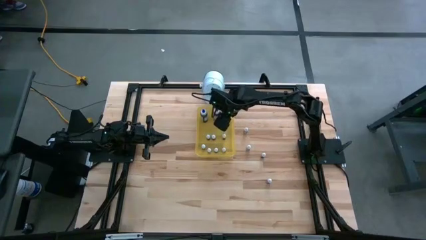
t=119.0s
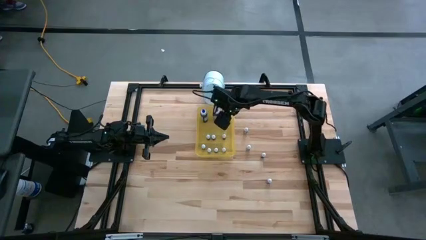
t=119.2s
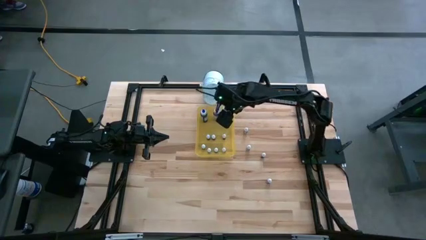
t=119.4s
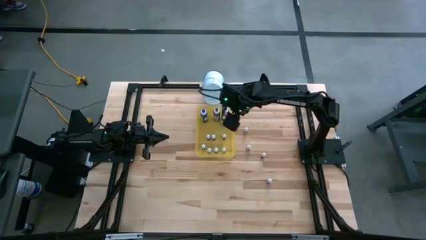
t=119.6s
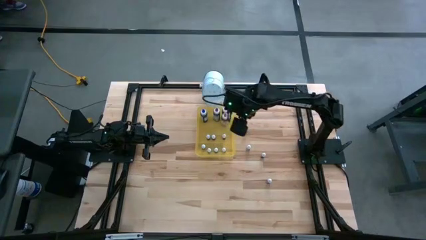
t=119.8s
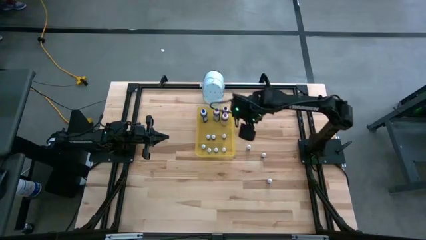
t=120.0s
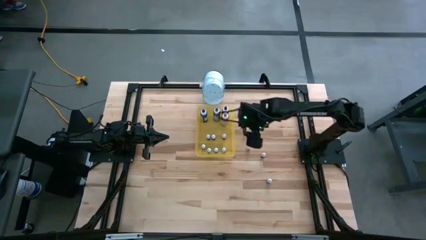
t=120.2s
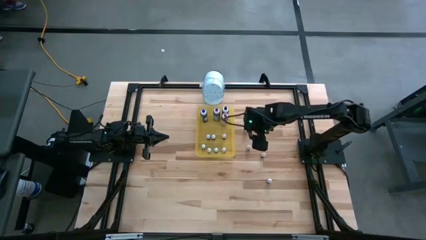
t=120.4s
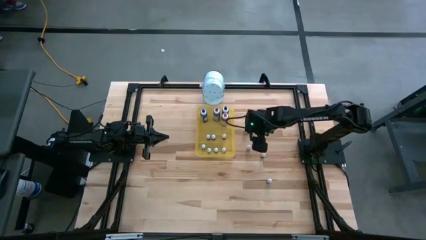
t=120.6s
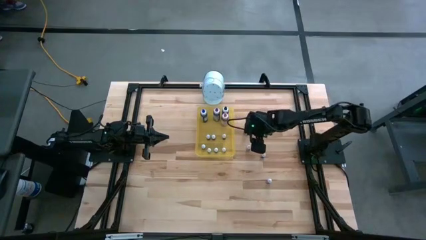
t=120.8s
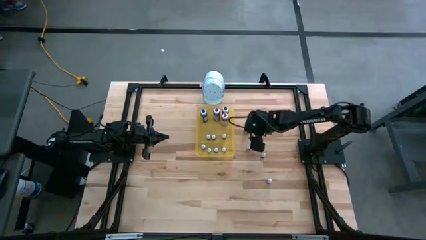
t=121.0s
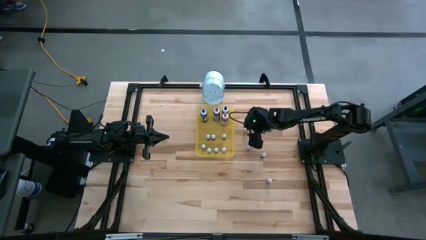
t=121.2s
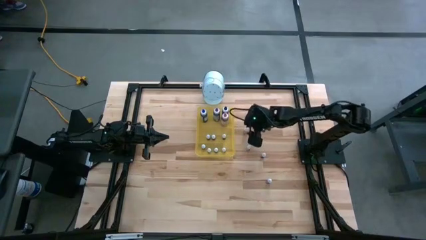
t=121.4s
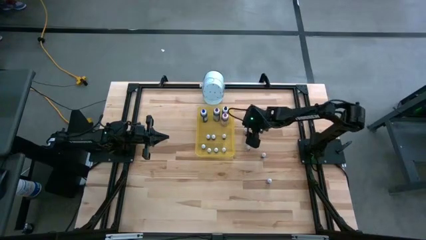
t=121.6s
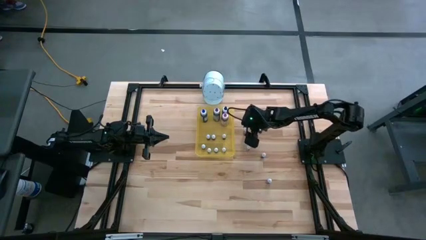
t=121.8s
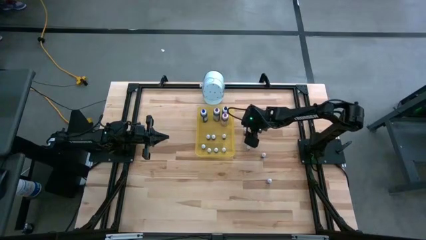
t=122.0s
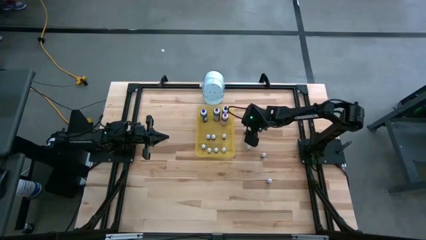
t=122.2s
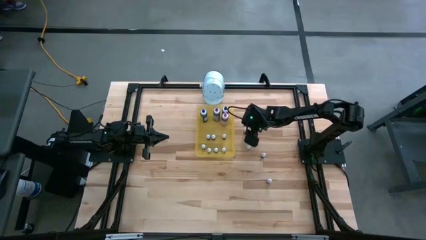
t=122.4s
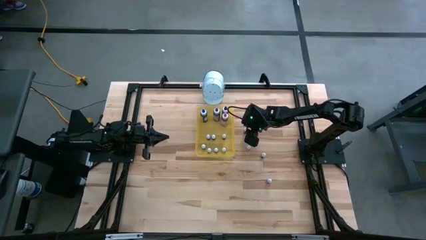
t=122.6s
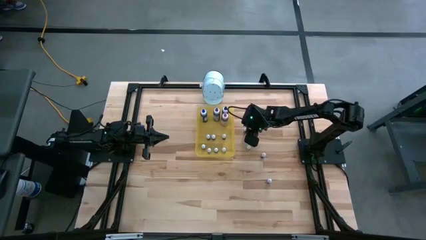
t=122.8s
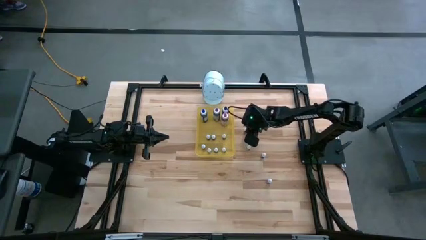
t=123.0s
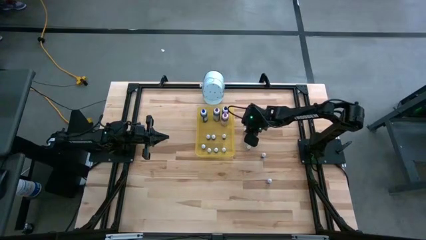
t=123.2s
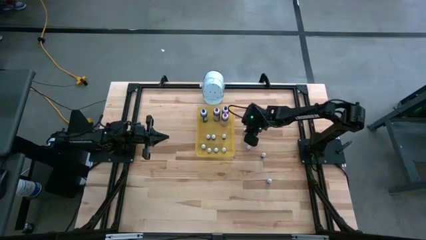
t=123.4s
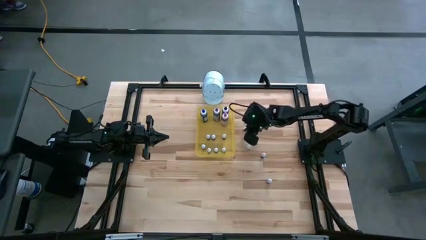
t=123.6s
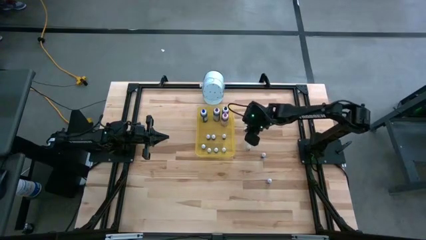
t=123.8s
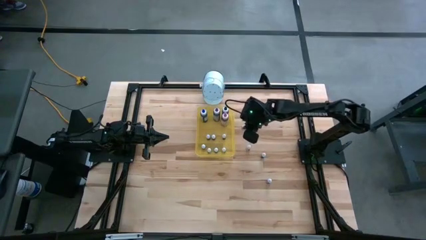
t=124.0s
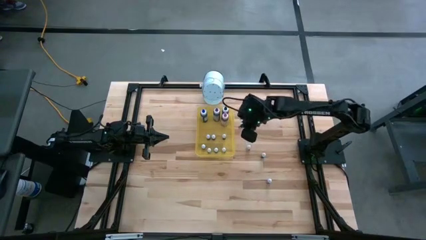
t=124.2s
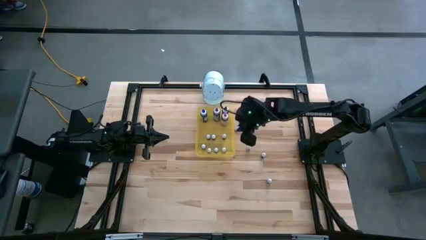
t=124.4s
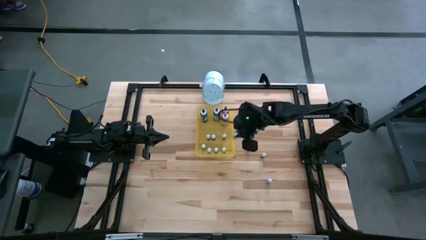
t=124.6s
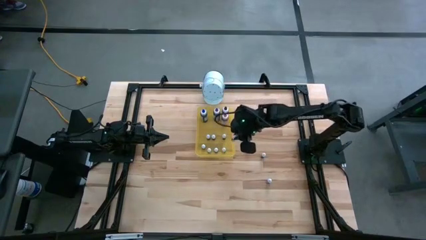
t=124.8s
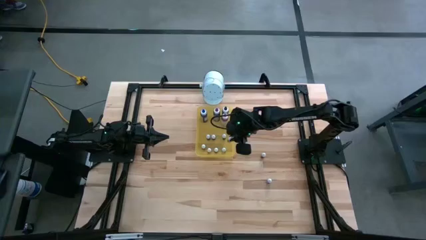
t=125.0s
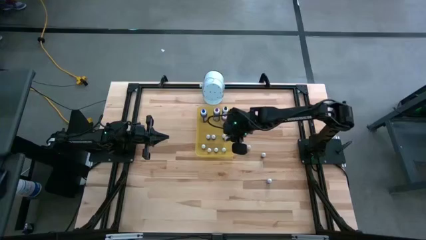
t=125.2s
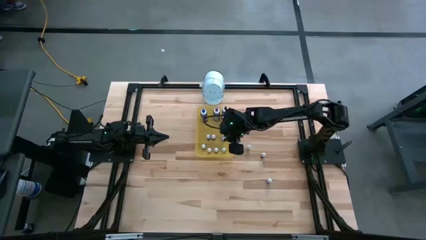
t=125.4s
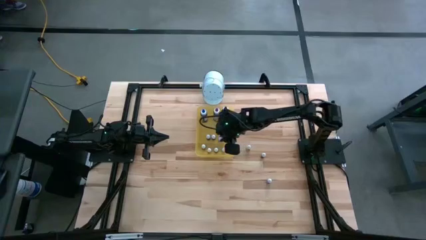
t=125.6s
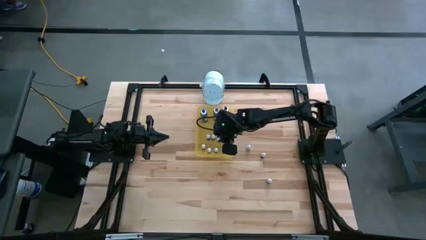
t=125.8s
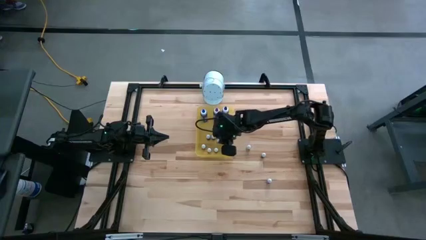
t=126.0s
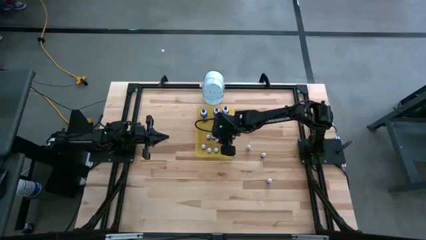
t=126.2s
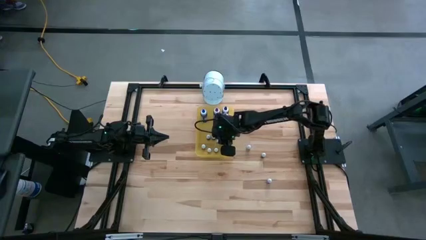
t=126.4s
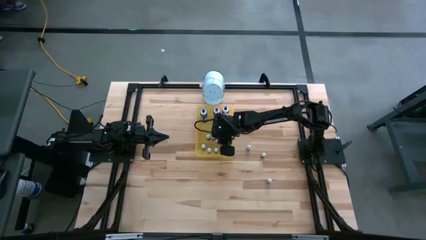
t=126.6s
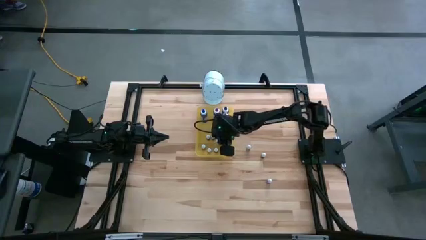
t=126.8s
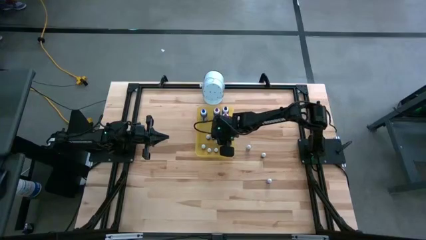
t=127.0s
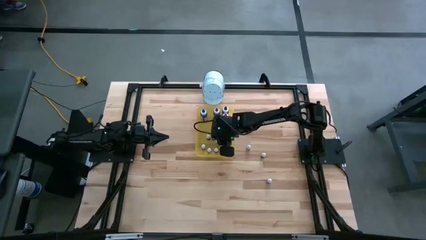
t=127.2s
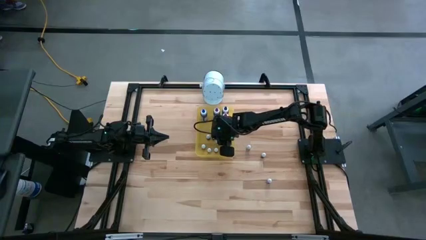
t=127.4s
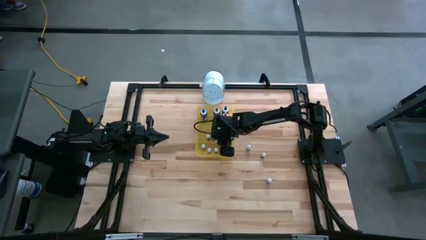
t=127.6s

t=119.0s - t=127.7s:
Task: Pick & Place food coloring
Put the small gray food coloring bottle in the yellow transparent bin

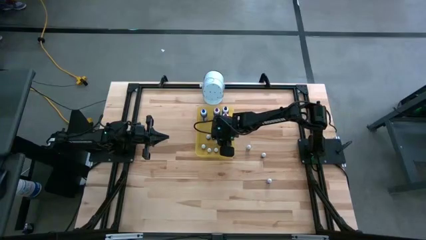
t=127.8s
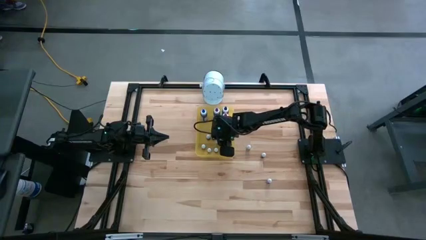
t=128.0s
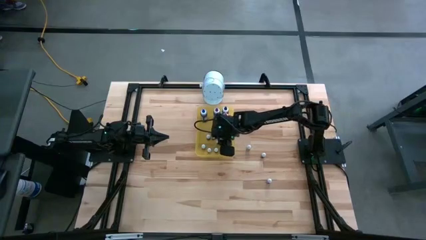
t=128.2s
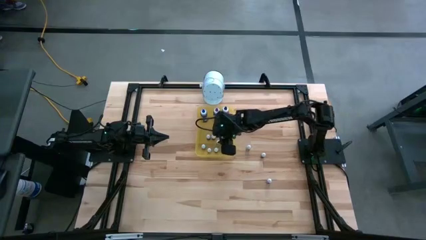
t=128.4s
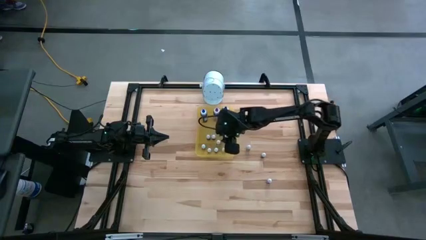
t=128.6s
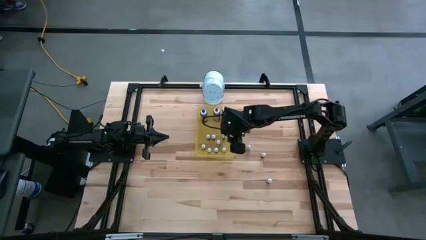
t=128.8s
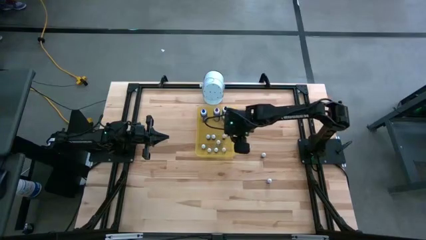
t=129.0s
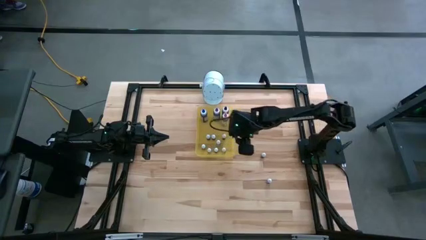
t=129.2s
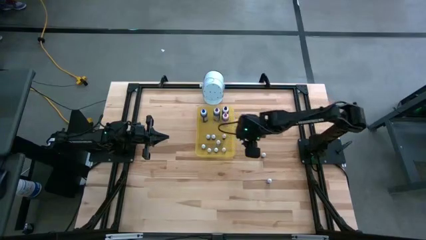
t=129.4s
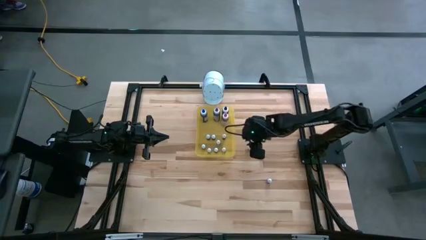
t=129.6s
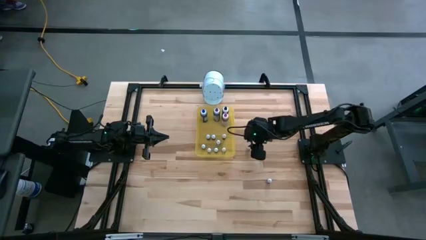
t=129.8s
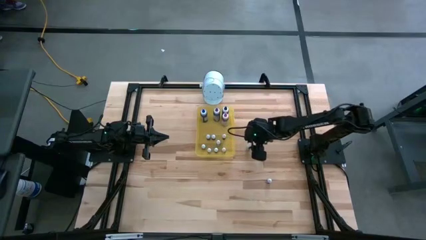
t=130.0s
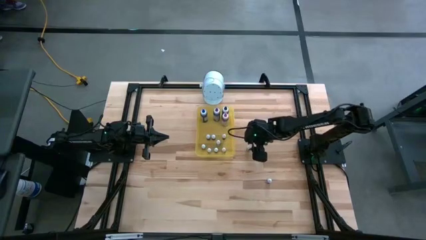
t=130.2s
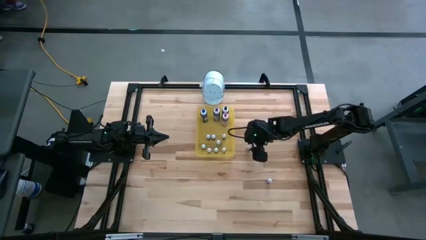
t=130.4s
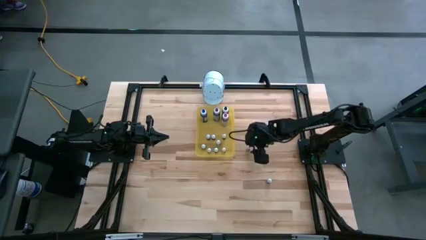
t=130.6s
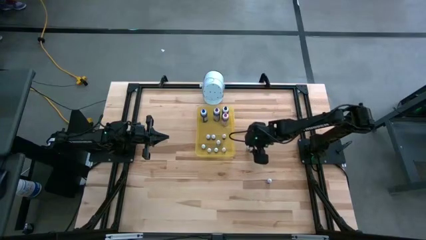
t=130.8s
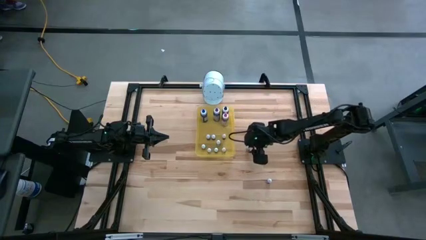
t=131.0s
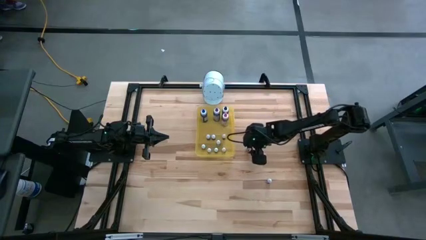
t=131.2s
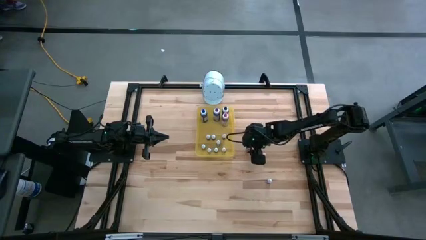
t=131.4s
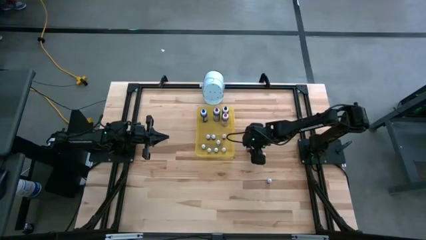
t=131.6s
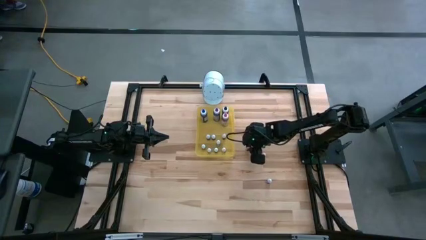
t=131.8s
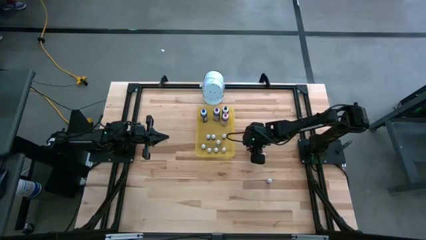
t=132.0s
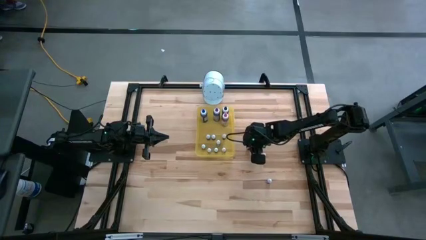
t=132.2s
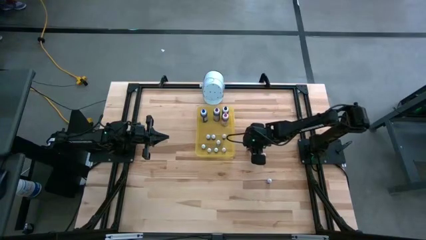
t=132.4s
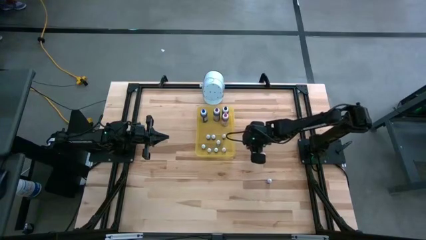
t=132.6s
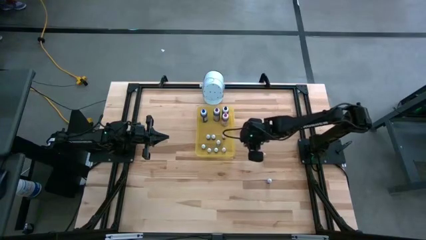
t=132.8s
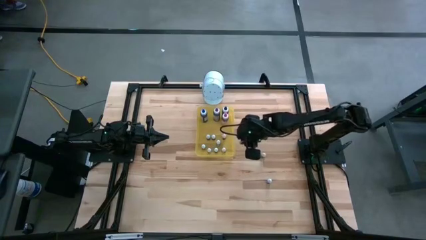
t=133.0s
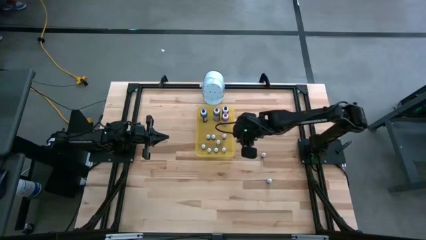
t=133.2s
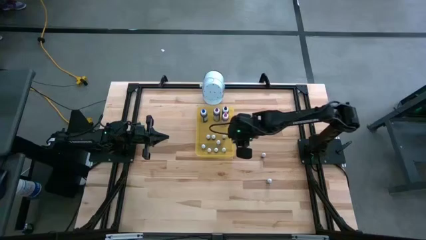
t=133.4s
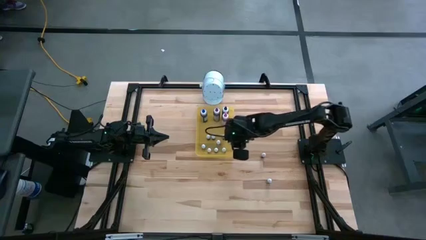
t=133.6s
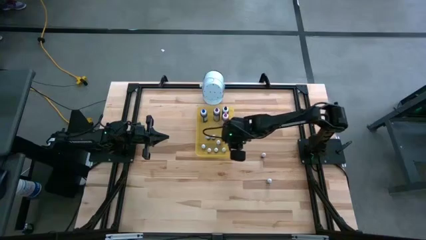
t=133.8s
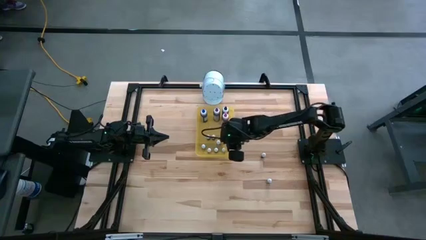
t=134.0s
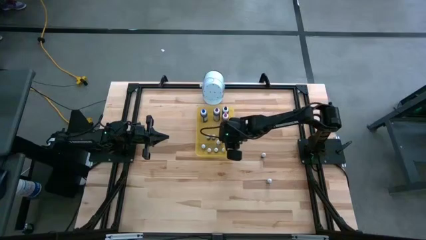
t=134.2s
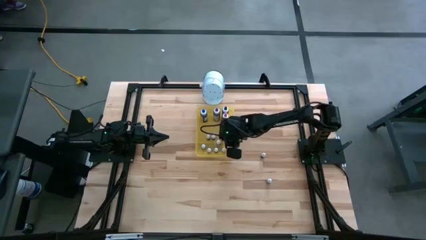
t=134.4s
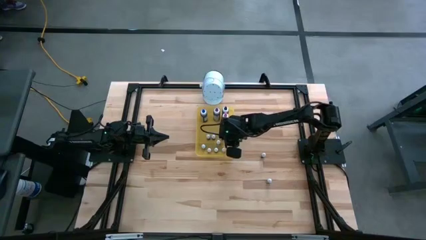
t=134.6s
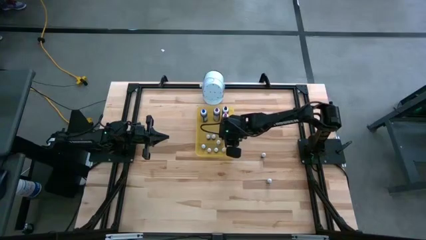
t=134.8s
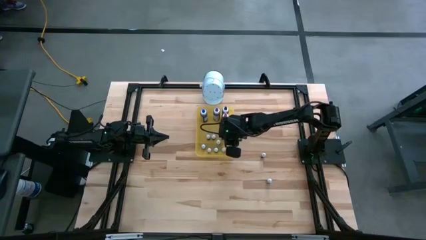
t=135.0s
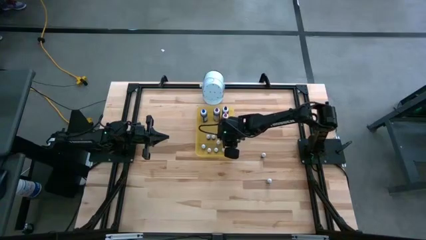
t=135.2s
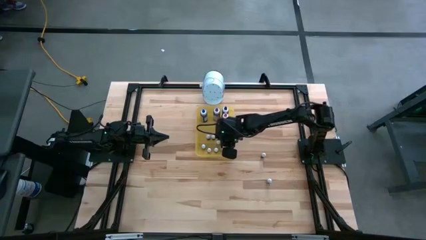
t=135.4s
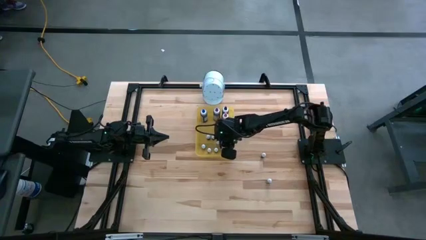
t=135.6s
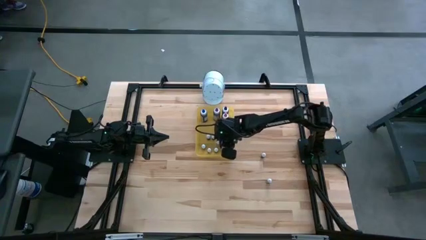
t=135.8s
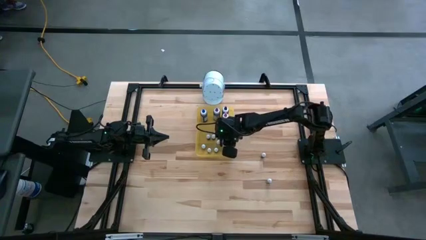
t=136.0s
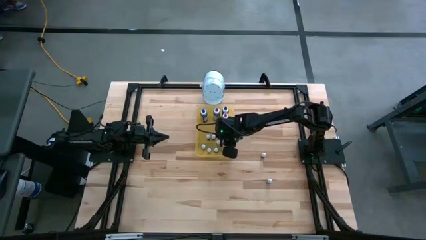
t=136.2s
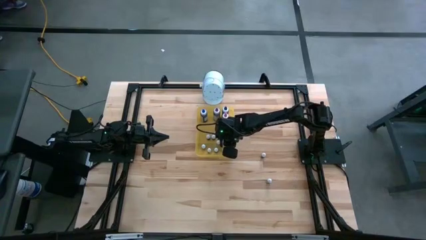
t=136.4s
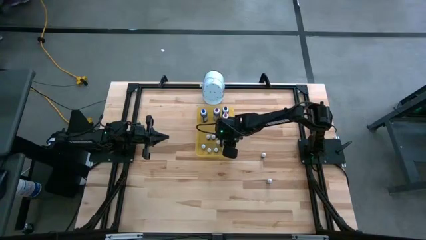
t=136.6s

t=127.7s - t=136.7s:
Put the small green food coloring bottle in the yellow transparent bin
